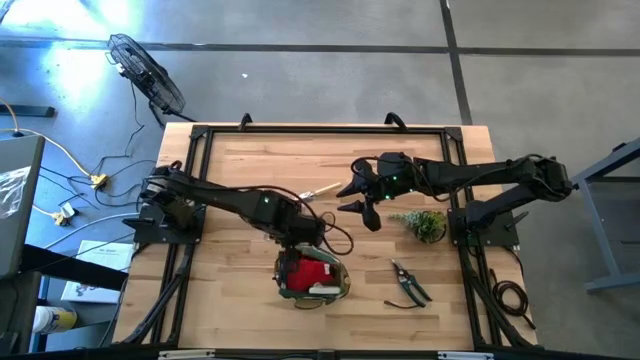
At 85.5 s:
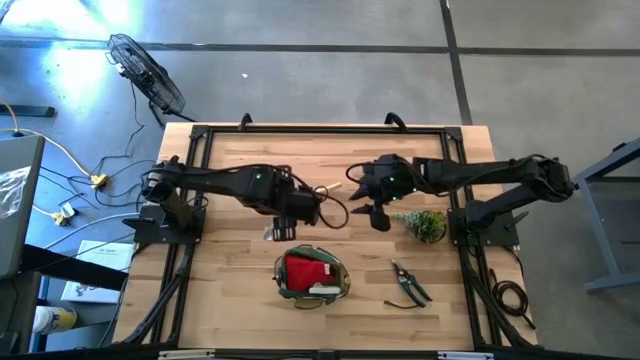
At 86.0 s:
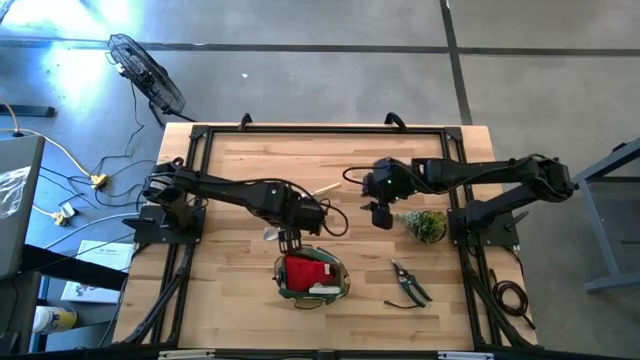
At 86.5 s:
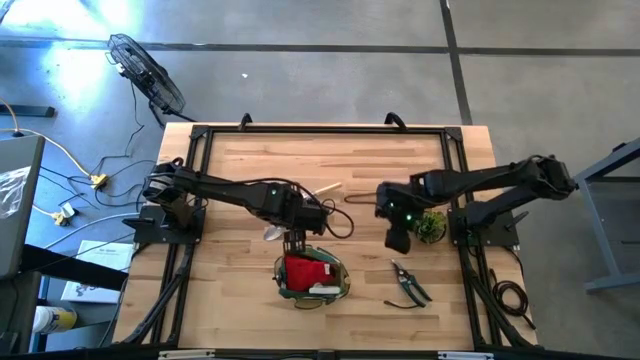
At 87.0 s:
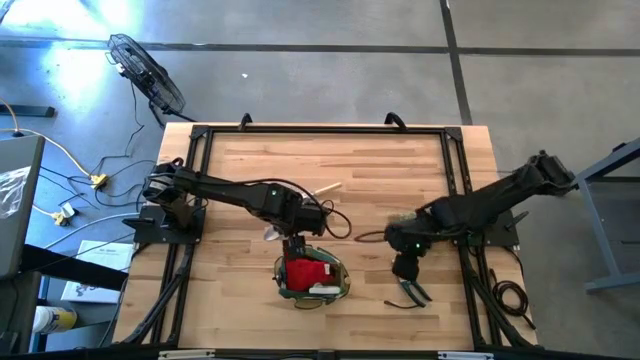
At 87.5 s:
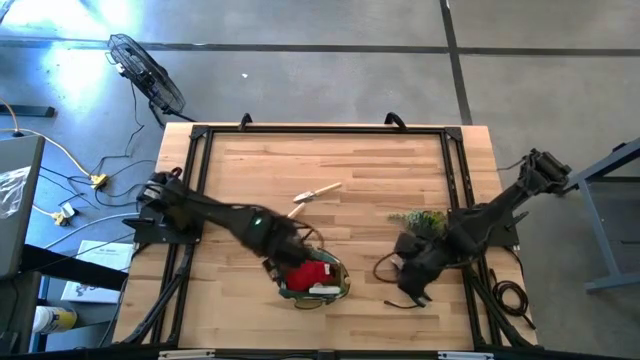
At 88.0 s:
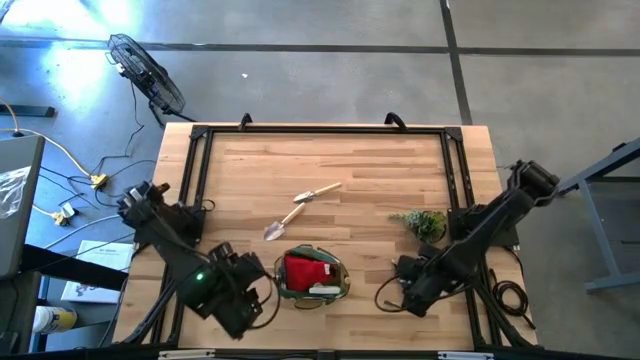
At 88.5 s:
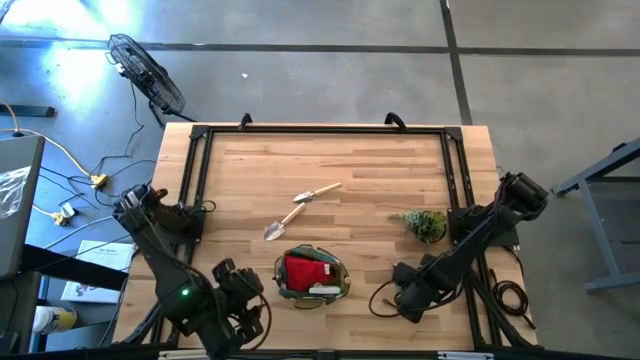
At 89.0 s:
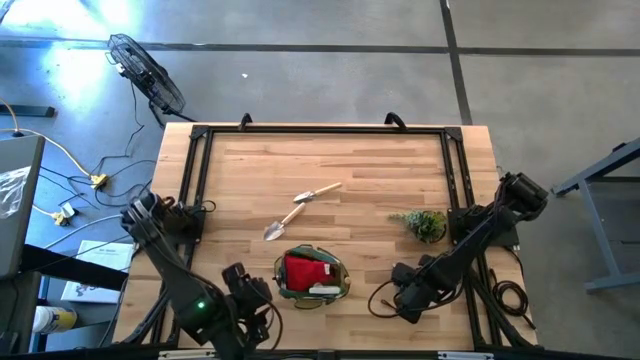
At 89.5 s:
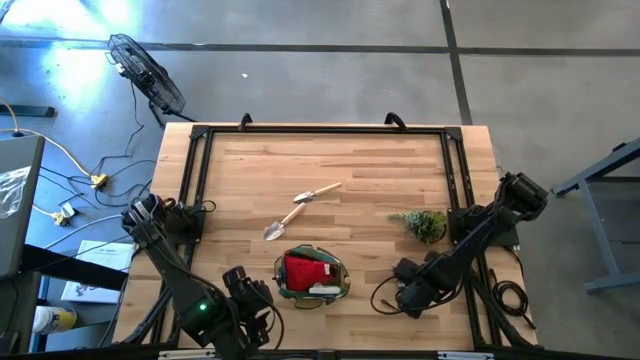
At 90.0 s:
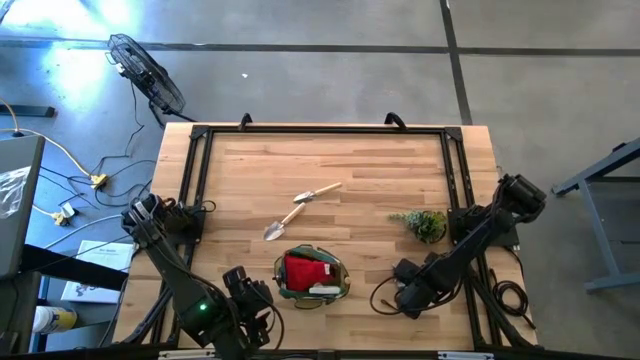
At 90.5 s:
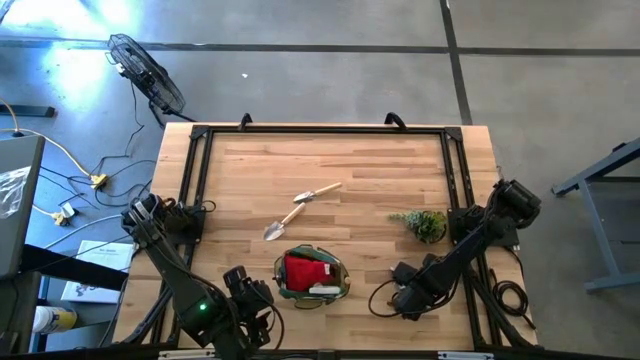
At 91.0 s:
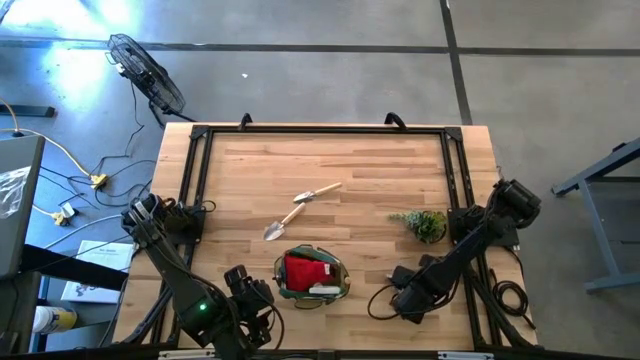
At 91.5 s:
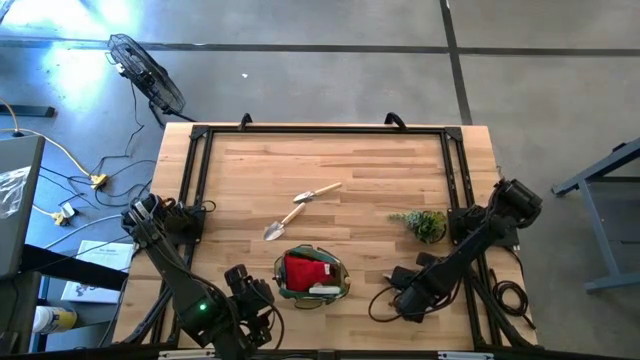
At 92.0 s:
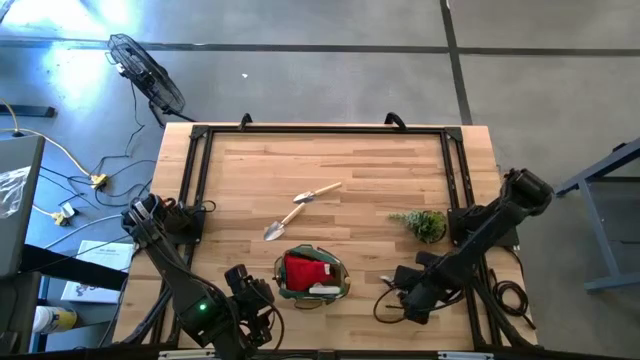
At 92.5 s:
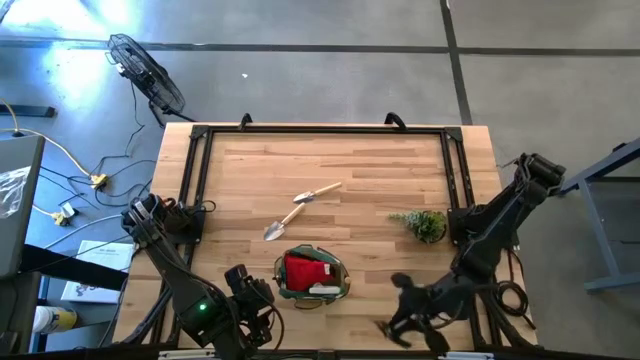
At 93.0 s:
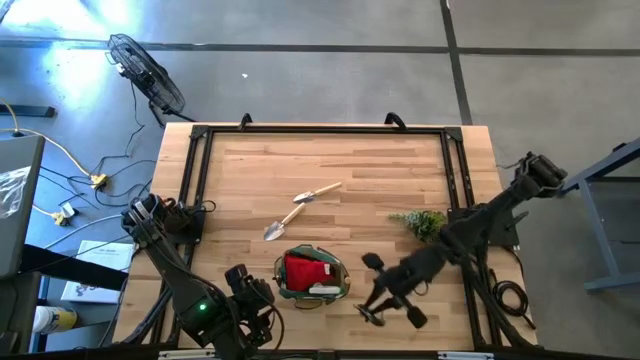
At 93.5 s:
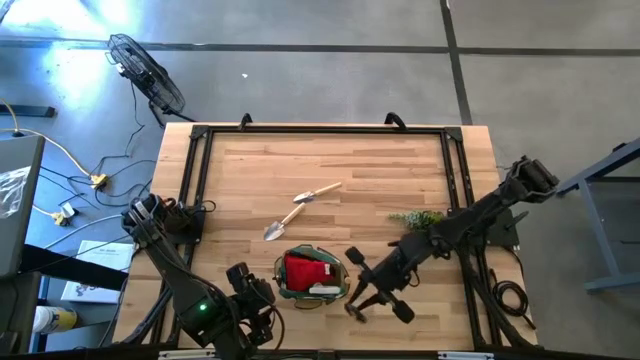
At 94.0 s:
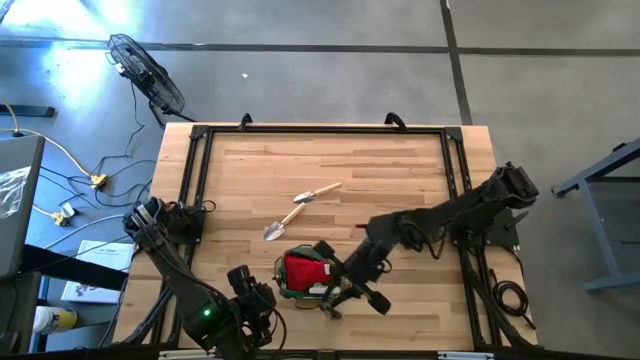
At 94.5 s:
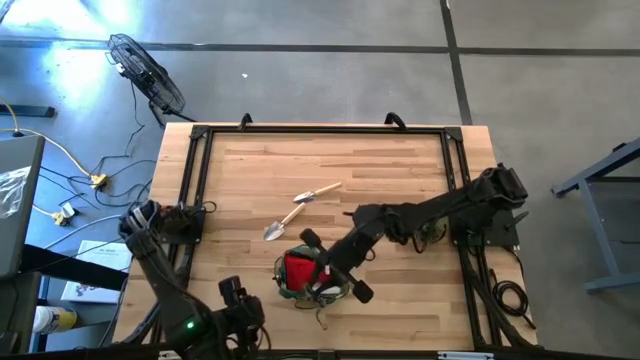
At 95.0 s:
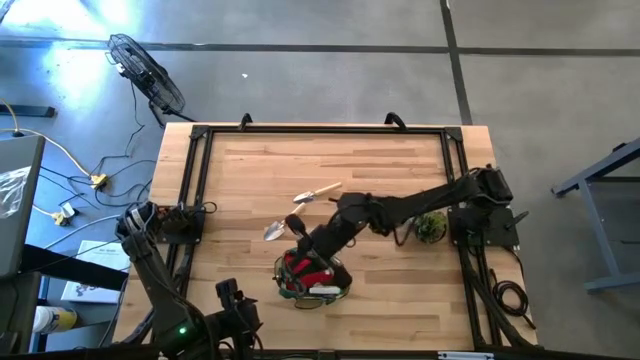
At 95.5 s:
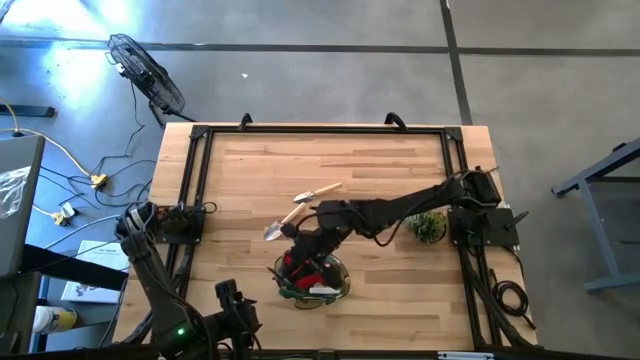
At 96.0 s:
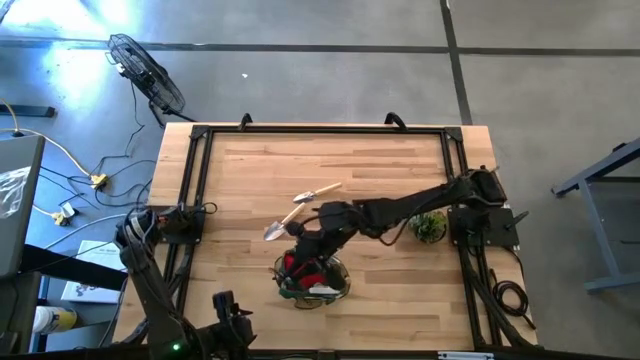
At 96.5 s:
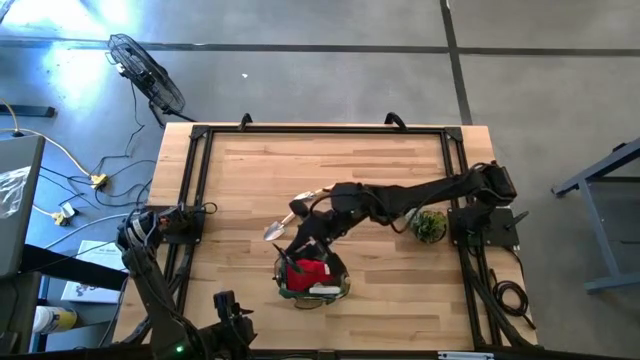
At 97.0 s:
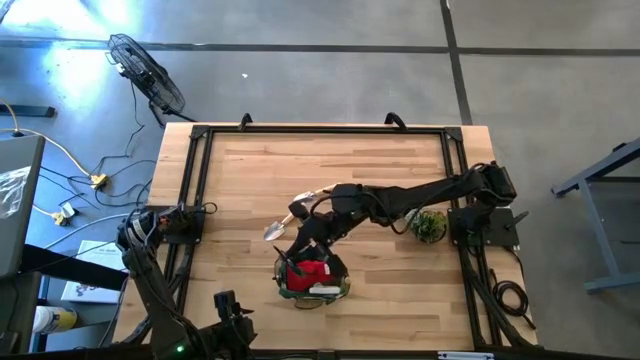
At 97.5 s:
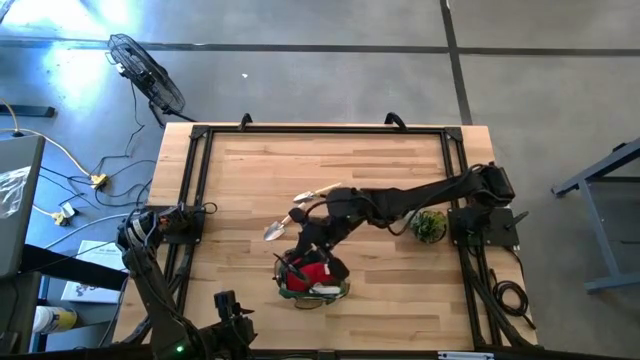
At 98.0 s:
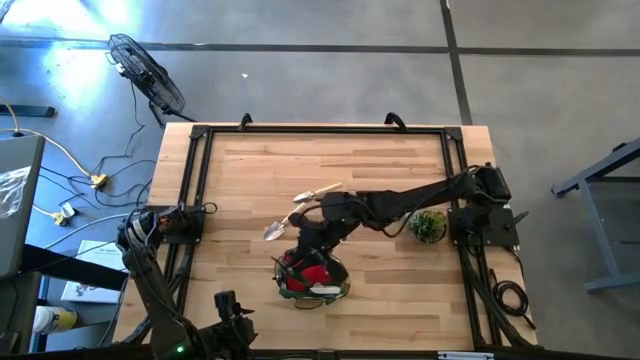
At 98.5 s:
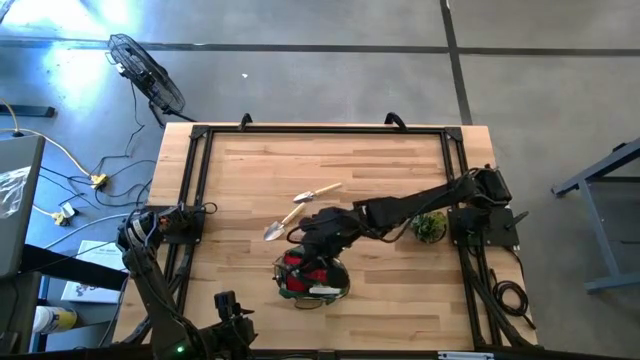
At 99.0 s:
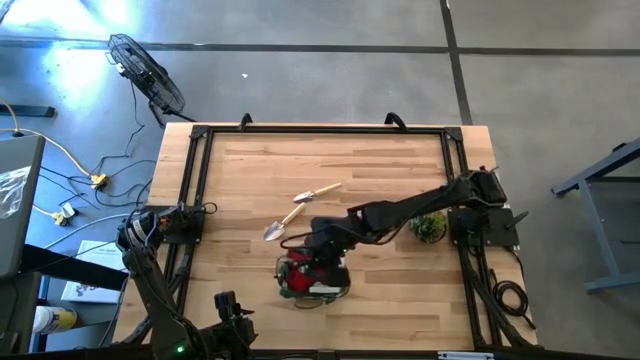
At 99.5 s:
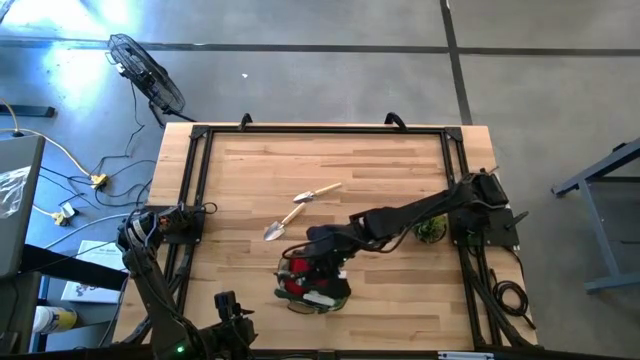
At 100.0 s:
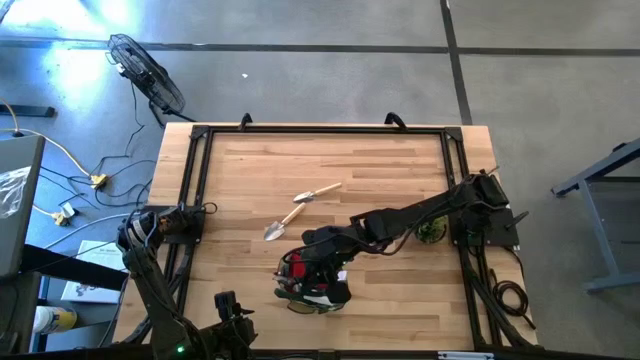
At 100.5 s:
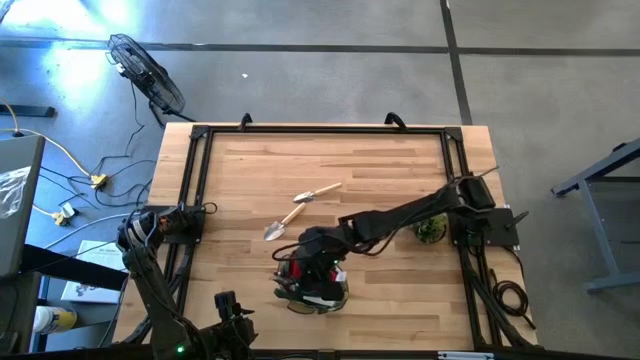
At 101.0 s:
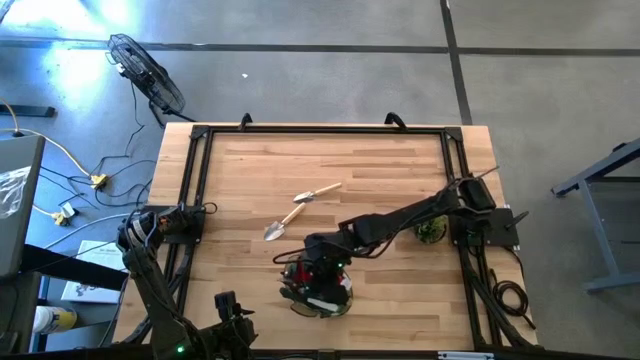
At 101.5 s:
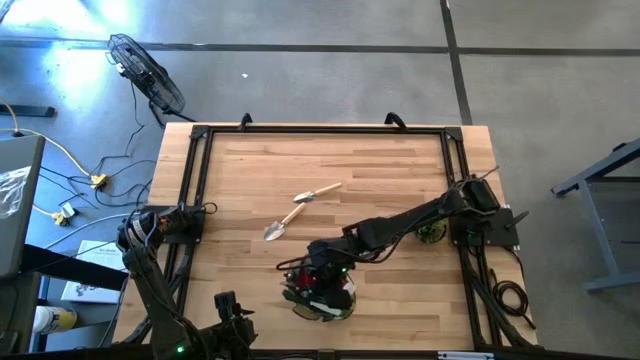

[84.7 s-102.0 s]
Task: Pick & Place Garden tools in Gardening bag
Put the green shear scissors into the gardening bag

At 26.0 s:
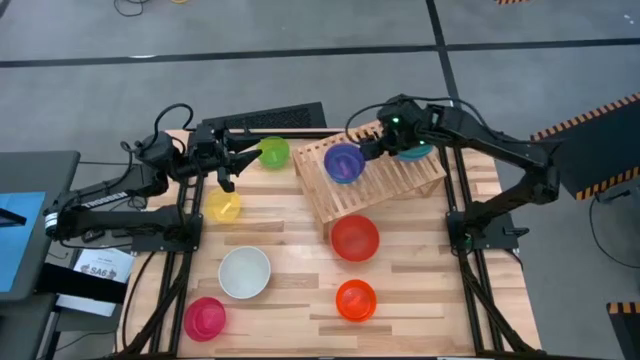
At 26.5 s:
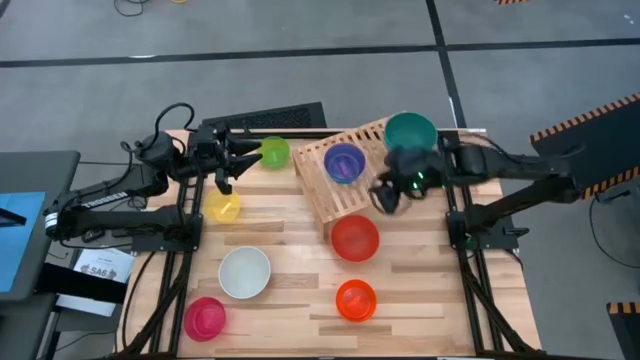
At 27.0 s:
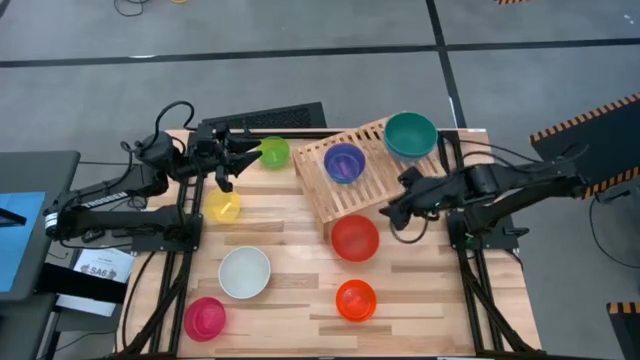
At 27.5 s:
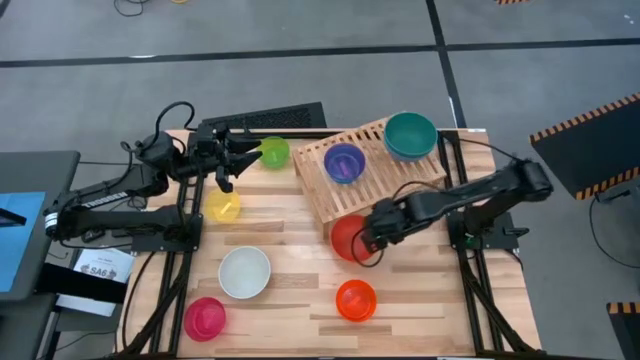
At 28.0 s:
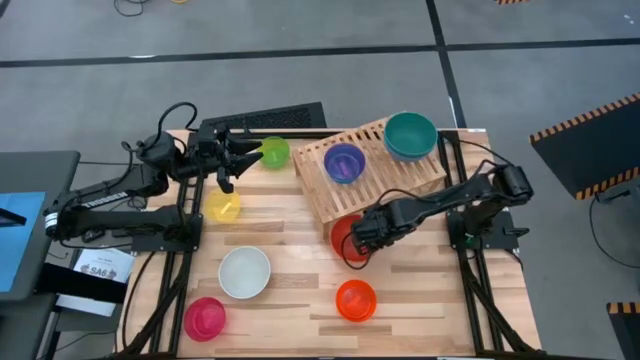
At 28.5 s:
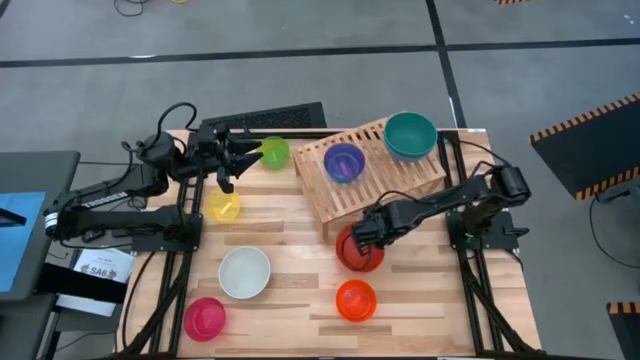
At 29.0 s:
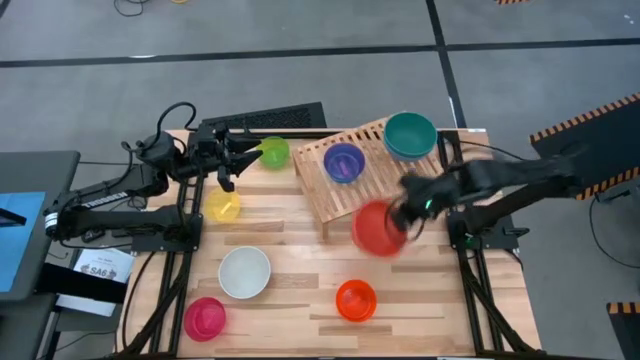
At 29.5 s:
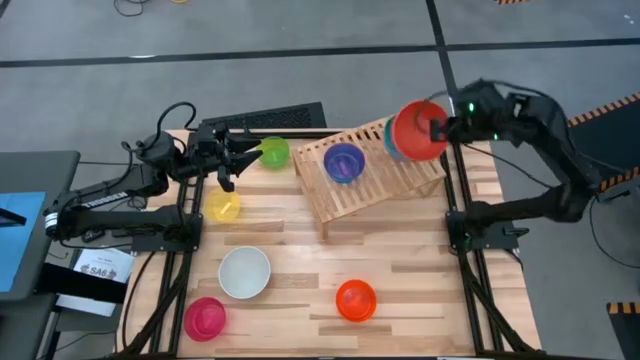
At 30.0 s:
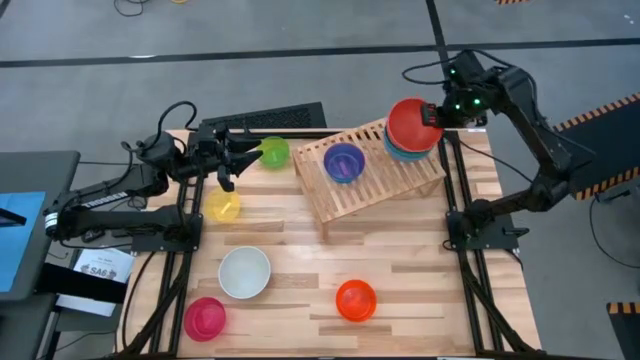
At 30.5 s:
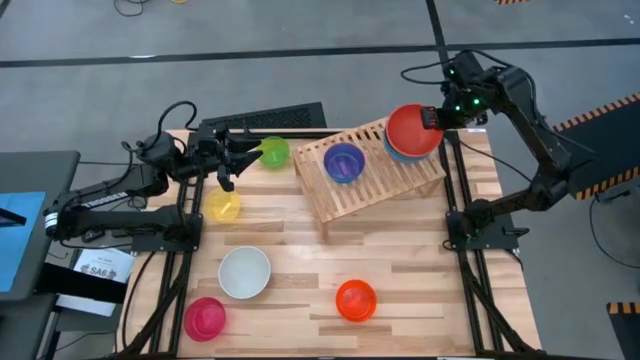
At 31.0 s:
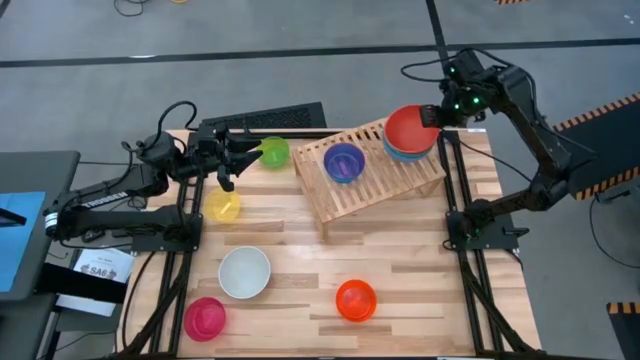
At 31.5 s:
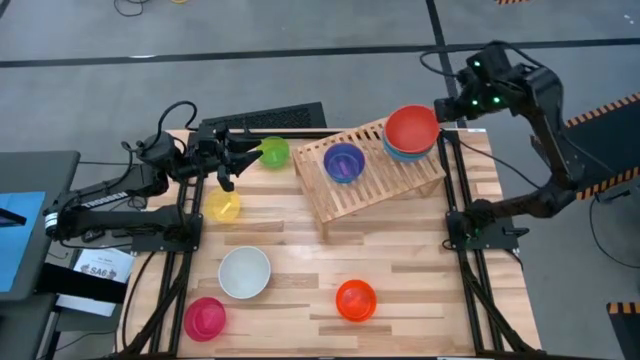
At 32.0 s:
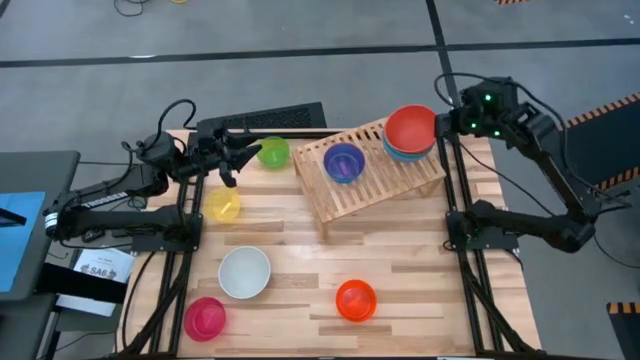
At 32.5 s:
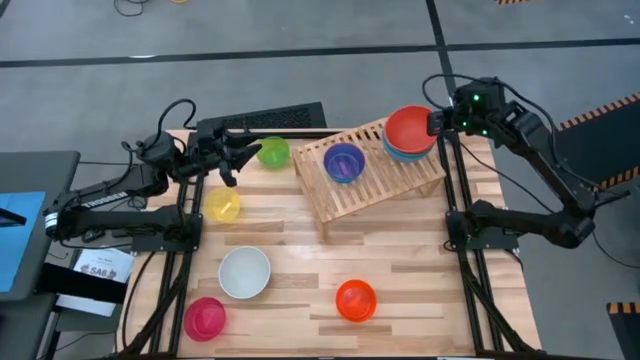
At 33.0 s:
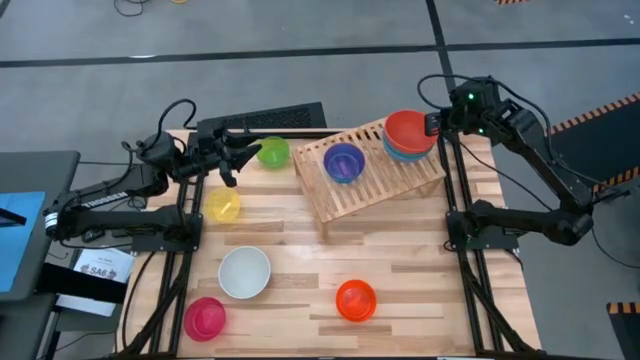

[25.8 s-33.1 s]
Task: Place and stack bowls onto a shelf
Stack the large orange bowl on top of the large green bowl on the shelf
